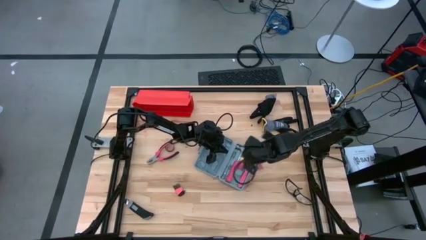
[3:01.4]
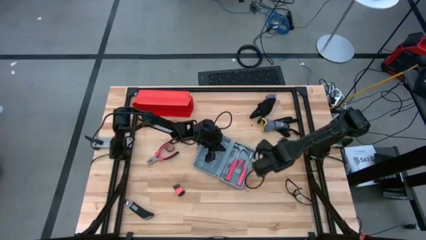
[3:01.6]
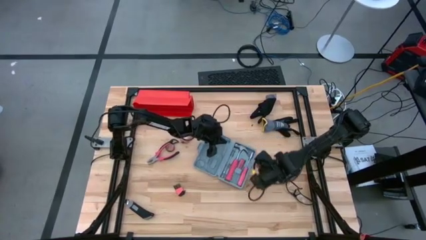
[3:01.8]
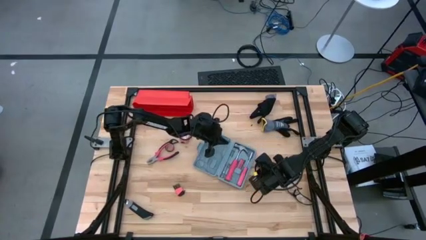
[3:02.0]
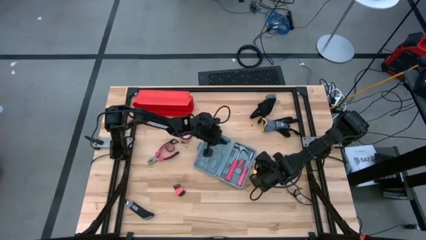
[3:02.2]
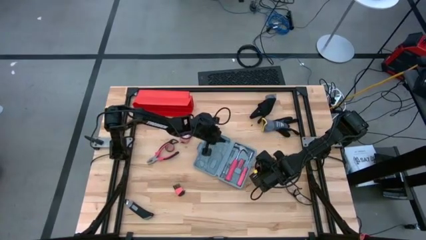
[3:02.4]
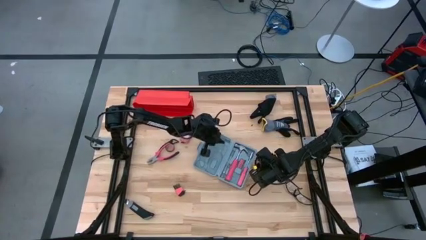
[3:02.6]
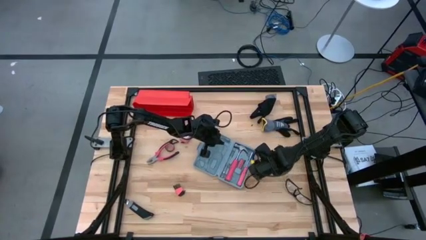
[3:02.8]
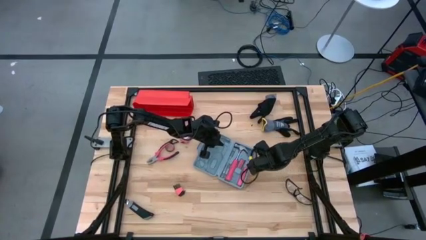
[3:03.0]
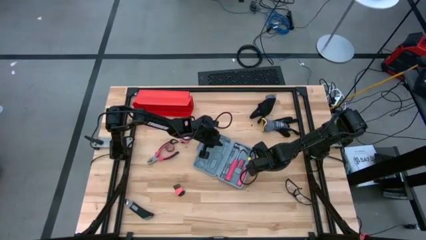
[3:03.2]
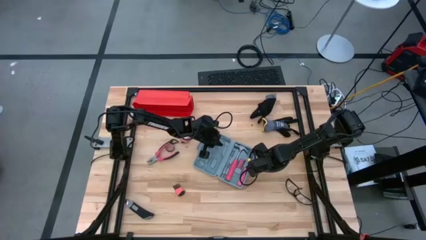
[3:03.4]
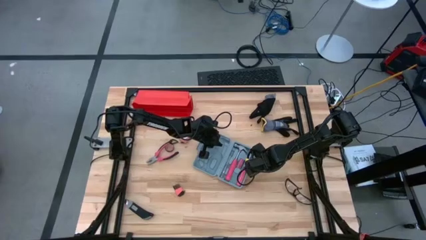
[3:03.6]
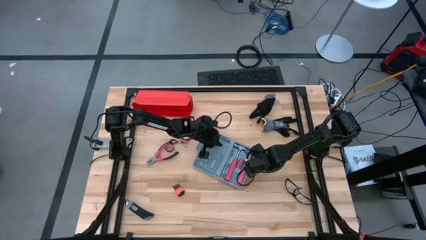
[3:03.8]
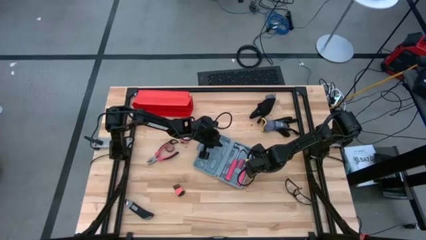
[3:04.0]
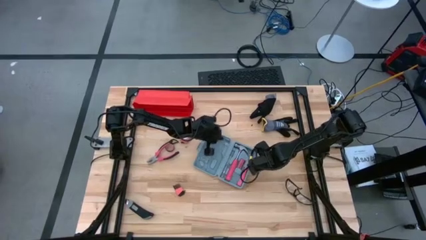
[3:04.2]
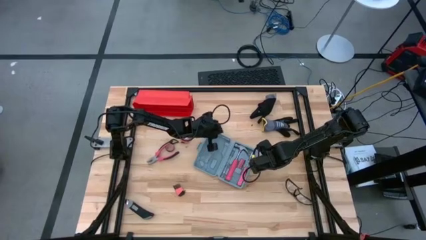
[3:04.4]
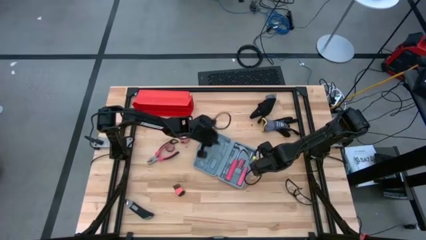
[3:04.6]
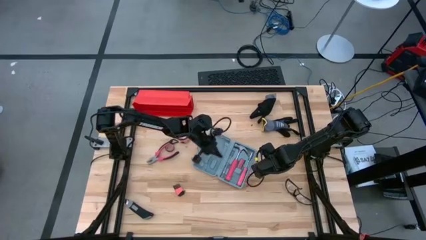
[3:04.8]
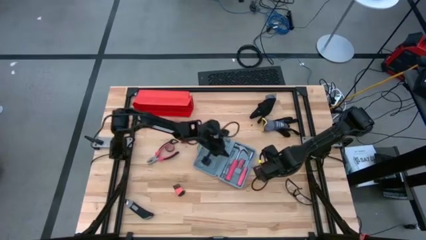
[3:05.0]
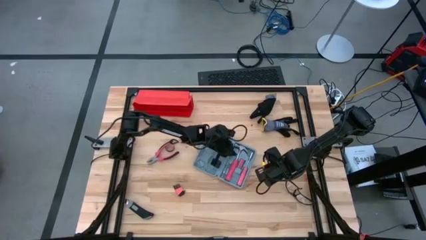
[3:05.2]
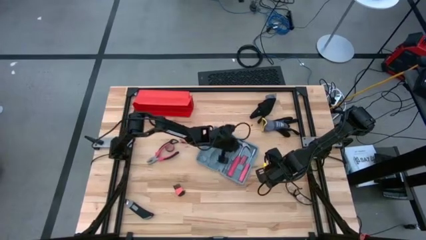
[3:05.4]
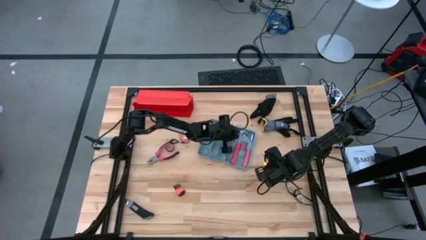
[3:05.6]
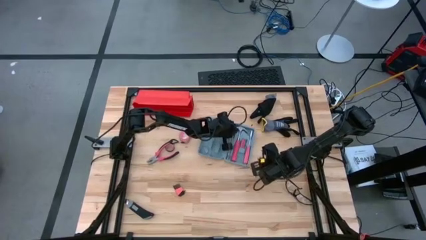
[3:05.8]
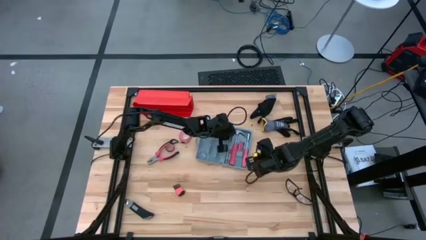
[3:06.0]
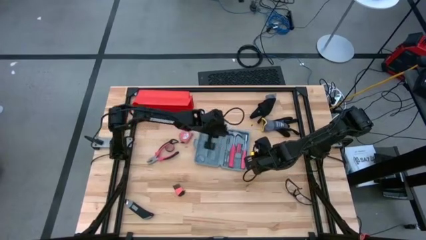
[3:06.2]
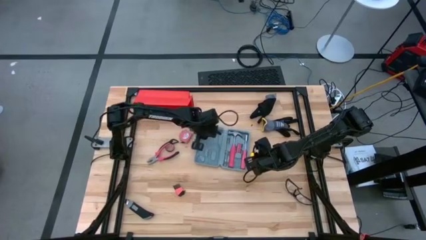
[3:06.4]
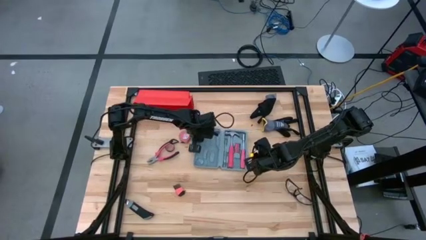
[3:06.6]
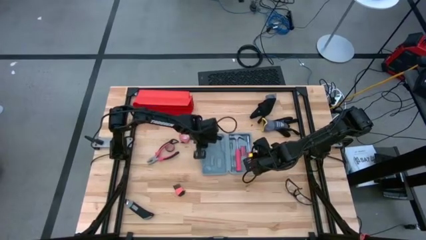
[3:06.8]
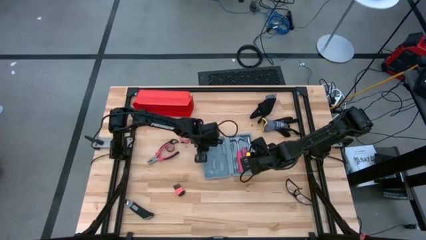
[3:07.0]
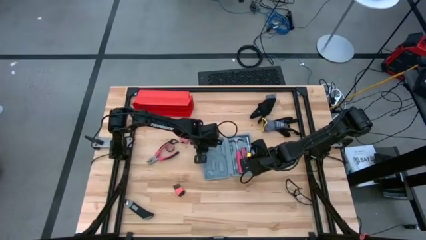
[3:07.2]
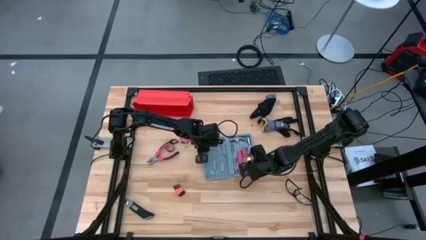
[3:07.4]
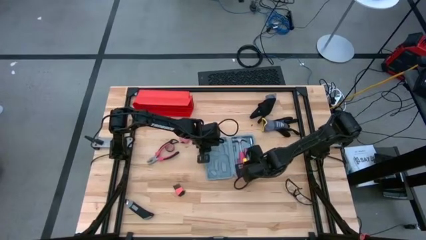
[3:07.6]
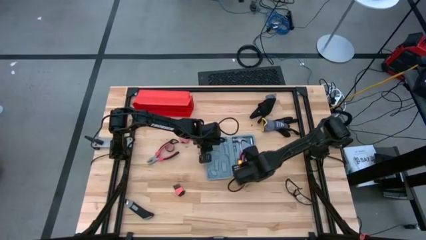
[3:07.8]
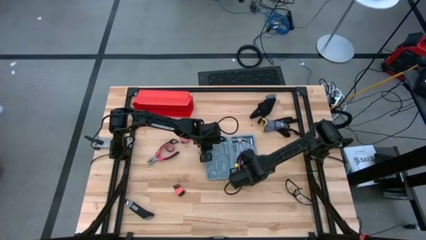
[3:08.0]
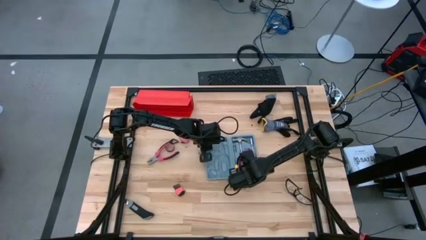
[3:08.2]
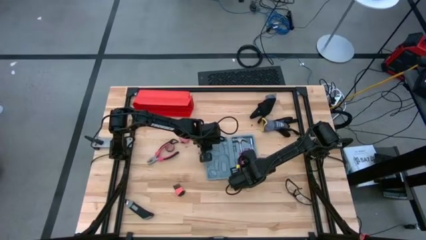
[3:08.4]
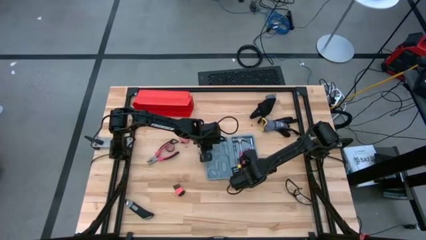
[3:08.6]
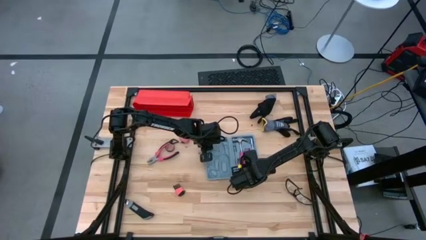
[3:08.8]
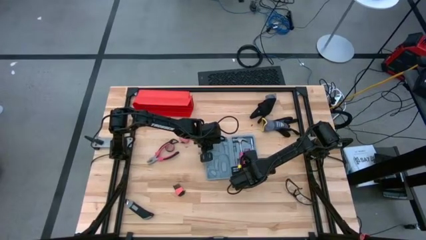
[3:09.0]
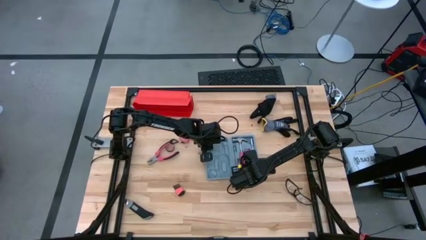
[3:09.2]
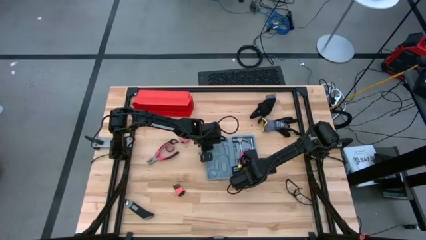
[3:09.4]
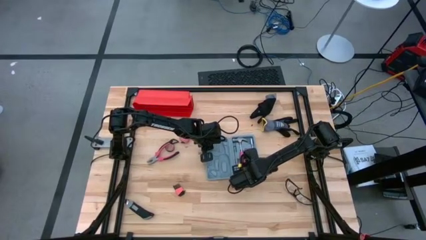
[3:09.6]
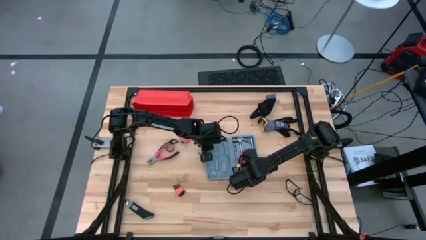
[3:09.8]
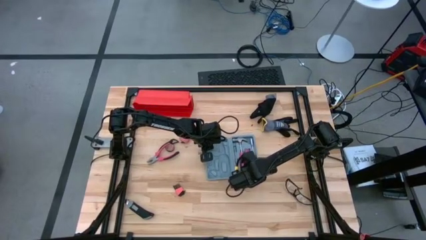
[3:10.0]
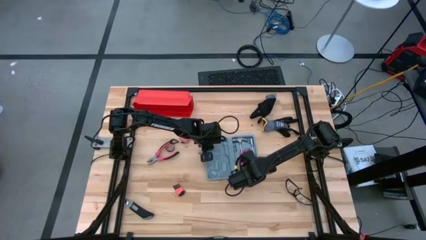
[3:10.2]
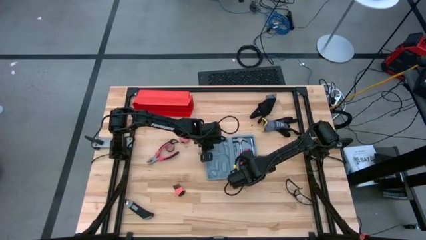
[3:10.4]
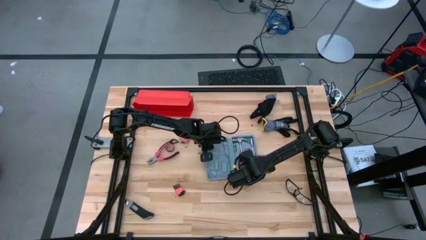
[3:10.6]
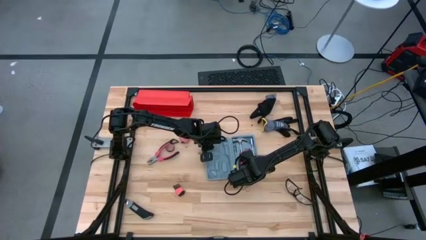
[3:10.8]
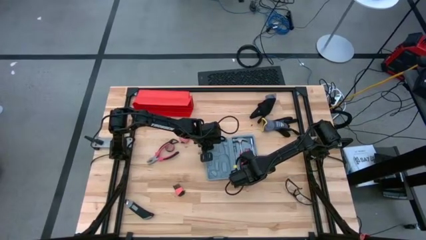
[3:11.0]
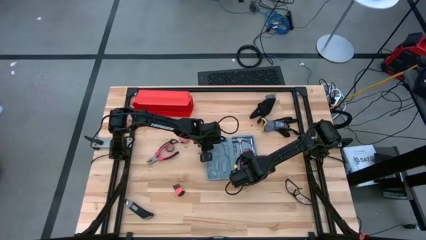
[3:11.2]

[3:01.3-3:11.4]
Task: prefit tool cases
Put the orange screwdriver bit set into the gray pre-fit tool case

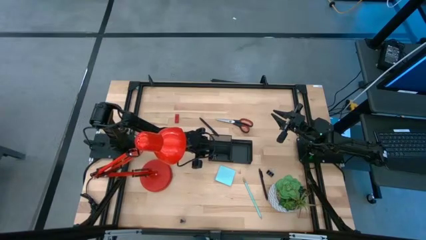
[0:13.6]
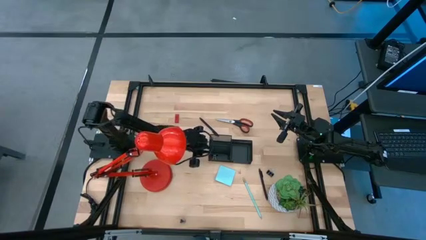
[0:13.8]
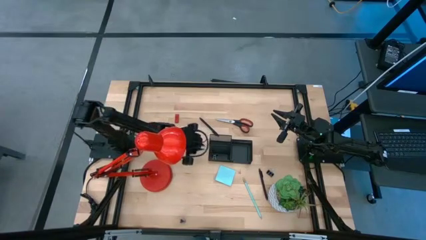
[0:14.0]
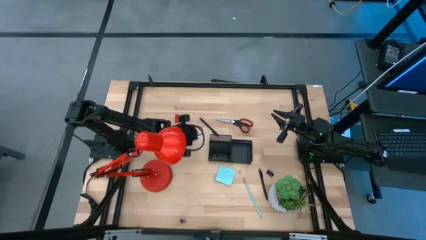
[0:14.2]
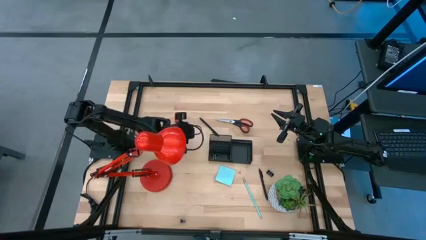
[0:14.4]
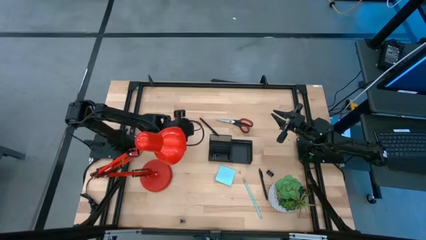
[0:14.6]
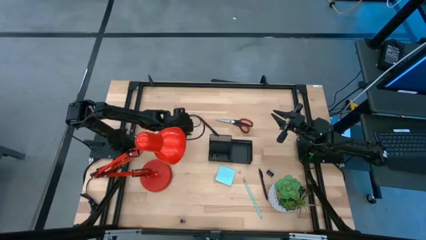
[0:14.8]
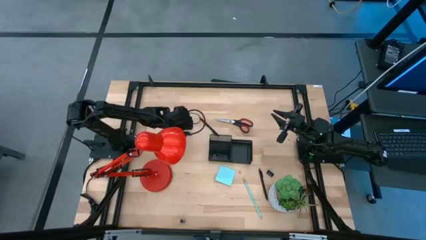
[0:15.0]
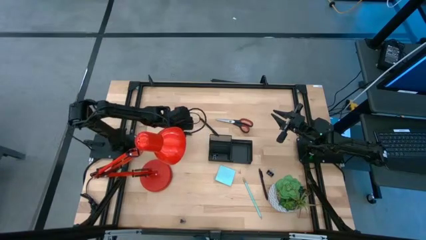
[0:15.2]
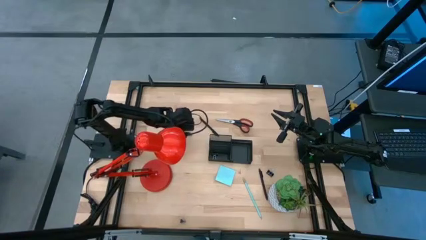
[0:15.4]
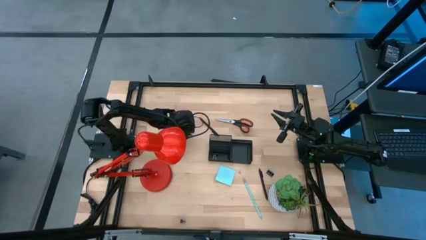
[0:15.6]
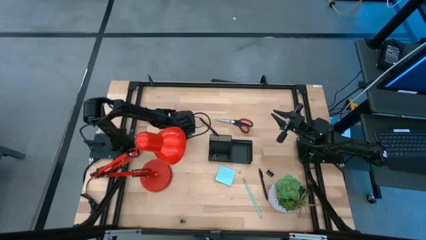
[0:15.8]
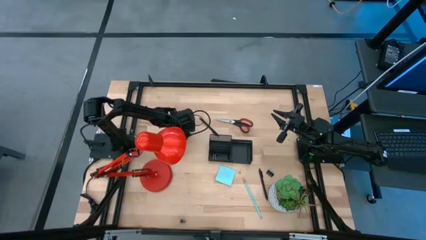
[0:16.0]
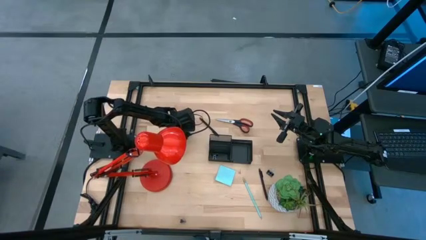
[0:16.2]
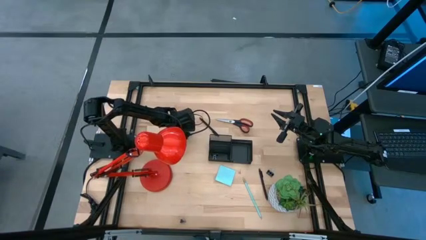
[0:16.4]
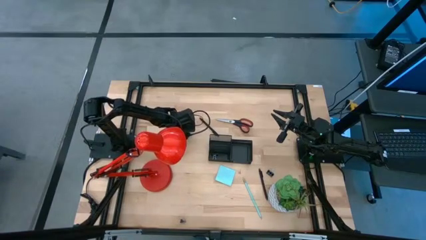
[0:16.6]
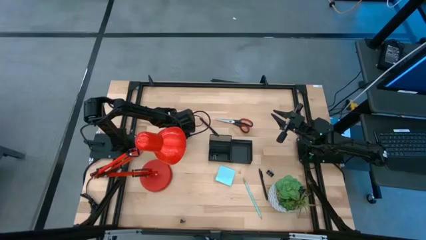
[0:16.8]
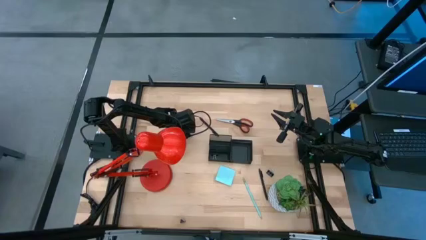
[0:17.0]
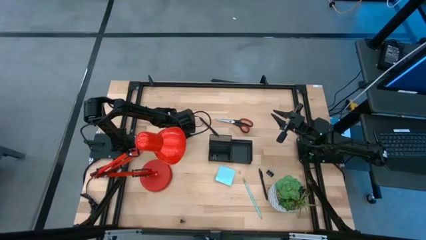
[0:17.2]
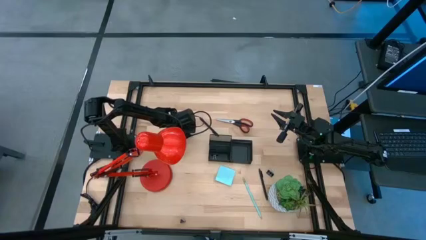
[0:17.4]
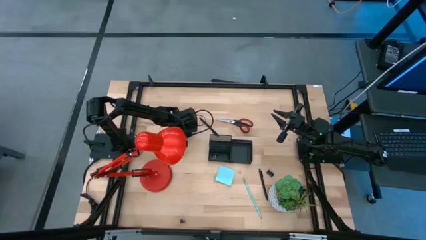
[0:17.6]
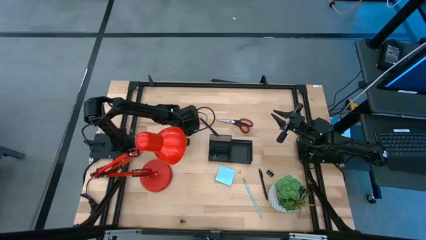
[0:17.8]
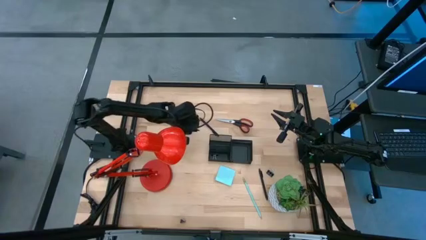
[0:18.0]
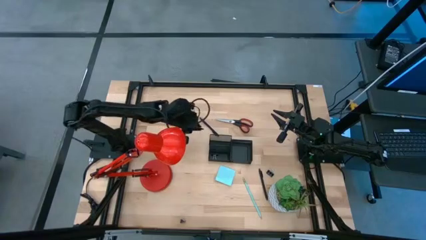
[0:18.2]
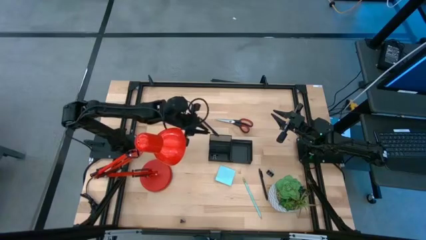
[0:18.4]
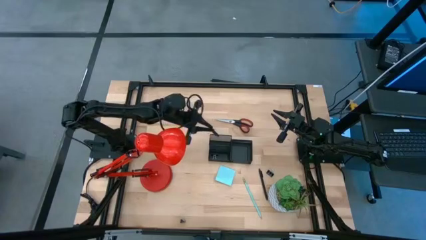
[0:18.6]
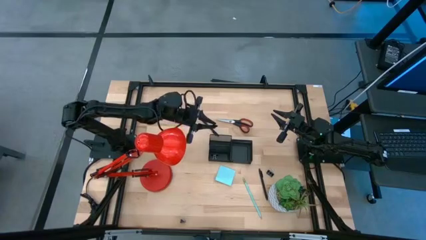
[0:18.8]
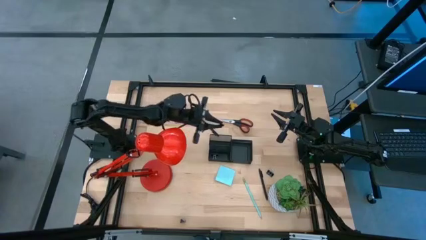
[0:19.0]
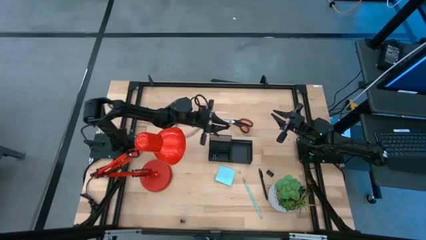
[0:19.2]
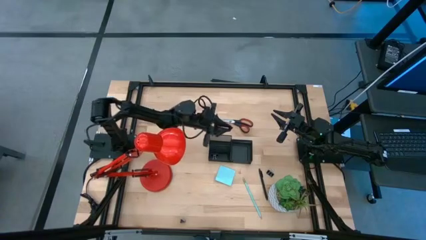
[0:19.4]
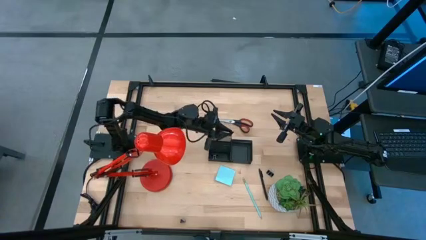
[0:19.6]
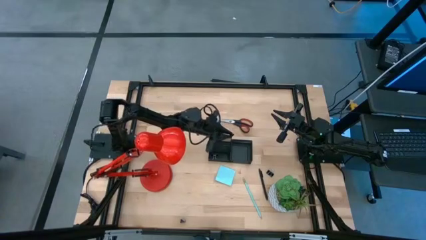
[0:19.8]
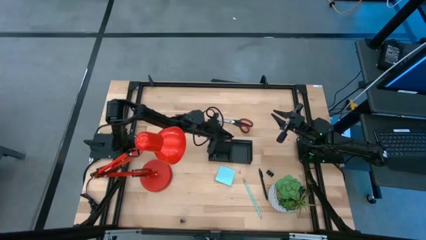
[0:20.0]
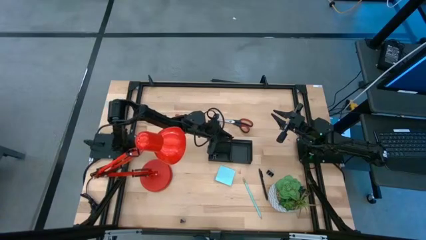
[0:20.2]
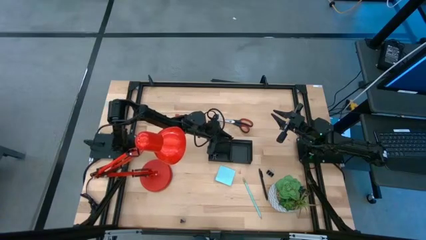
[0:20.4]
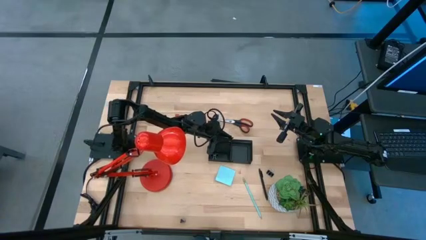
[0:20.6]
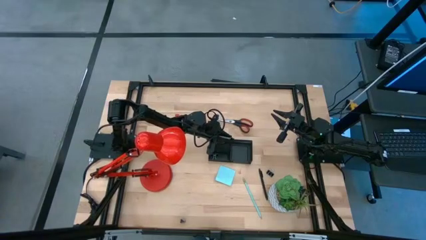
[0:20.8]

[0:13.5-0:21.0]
Task: Pick and place office supplies into organizer
Put the top left black pen into the black desk organizer
